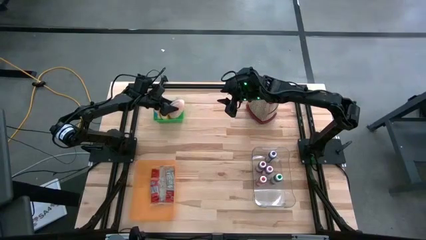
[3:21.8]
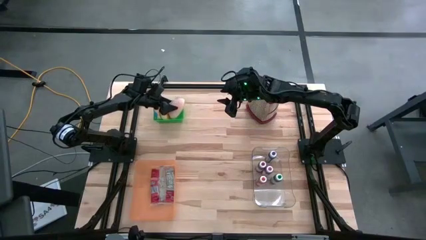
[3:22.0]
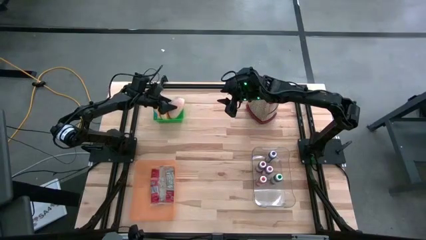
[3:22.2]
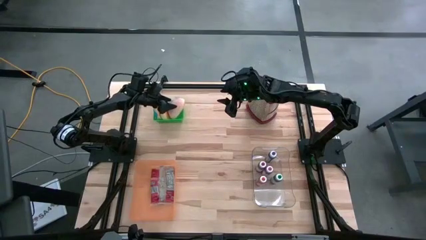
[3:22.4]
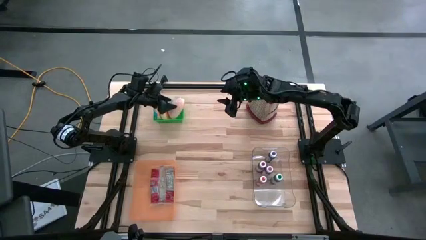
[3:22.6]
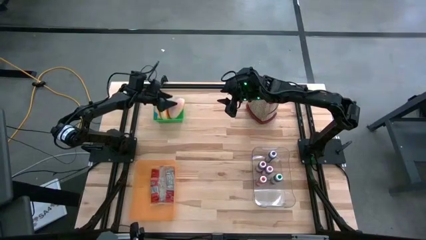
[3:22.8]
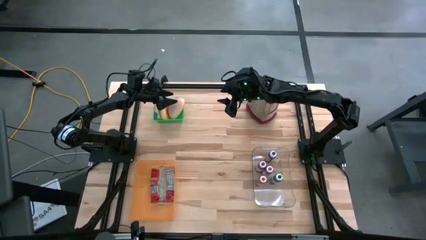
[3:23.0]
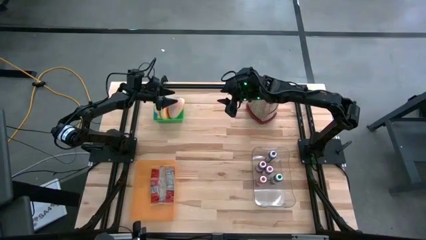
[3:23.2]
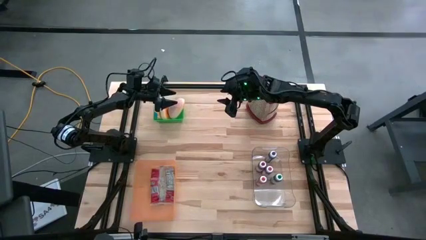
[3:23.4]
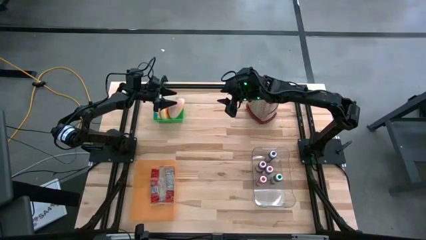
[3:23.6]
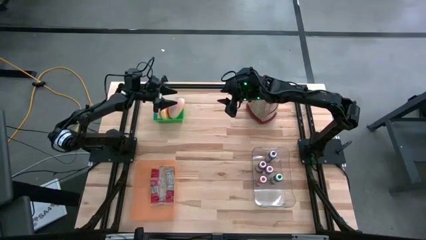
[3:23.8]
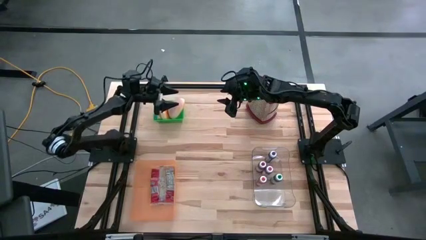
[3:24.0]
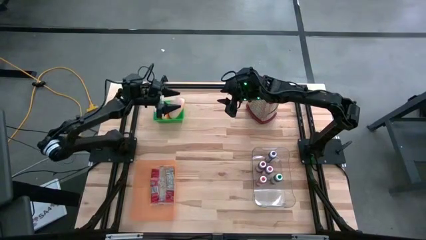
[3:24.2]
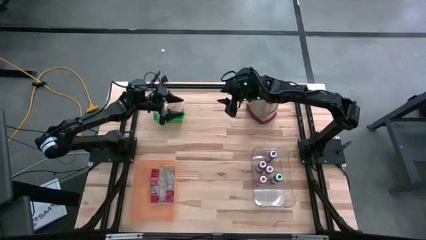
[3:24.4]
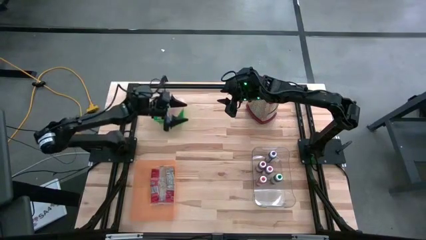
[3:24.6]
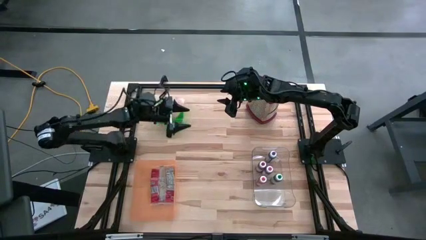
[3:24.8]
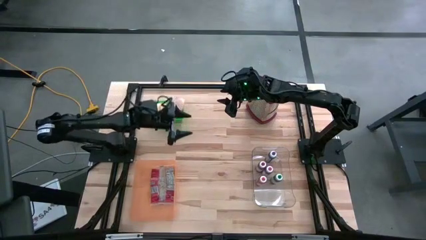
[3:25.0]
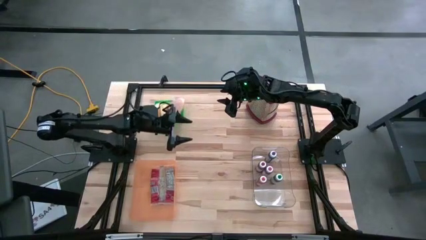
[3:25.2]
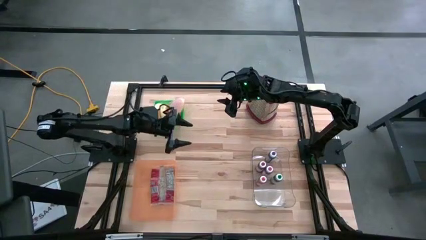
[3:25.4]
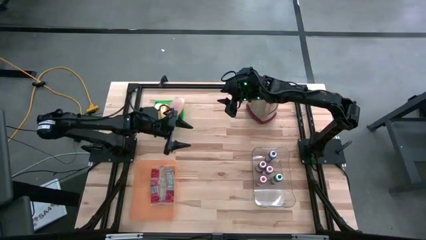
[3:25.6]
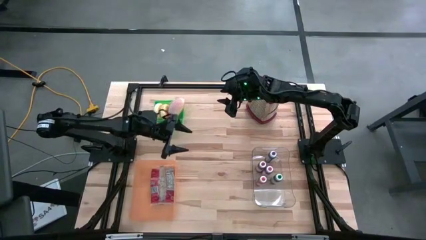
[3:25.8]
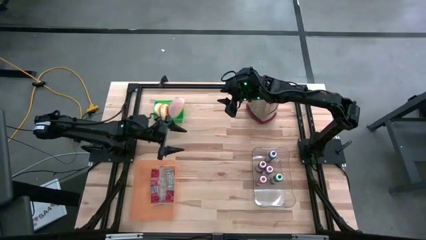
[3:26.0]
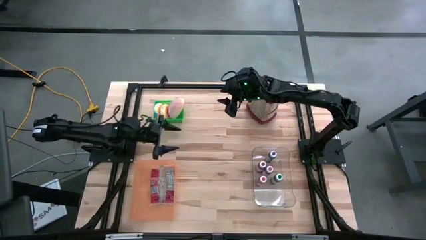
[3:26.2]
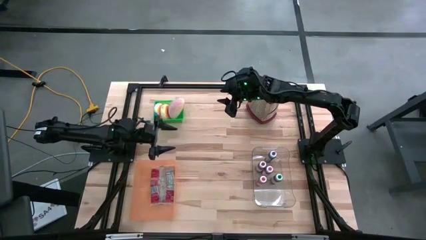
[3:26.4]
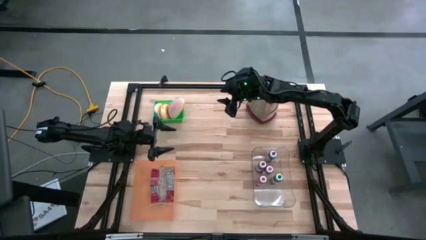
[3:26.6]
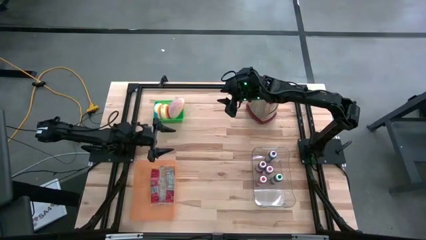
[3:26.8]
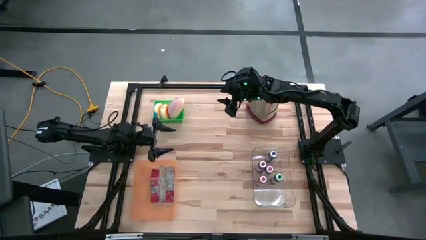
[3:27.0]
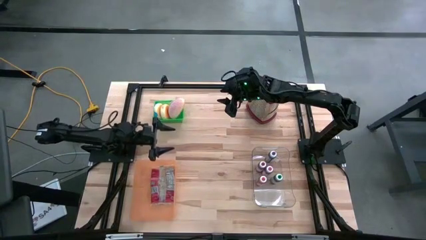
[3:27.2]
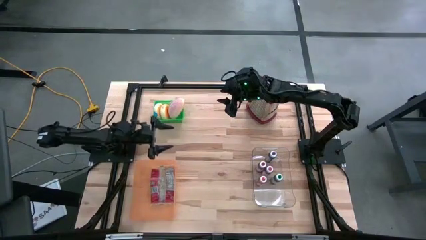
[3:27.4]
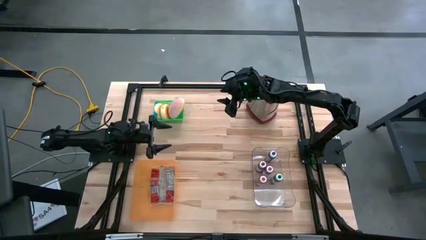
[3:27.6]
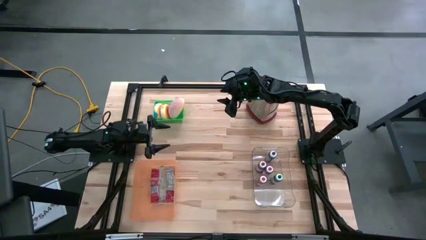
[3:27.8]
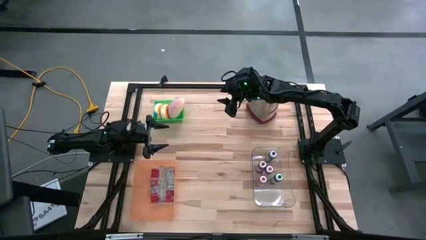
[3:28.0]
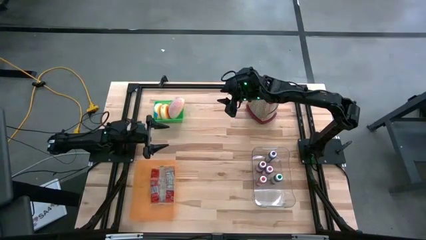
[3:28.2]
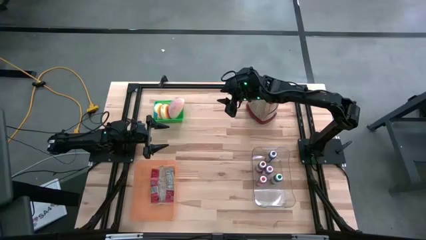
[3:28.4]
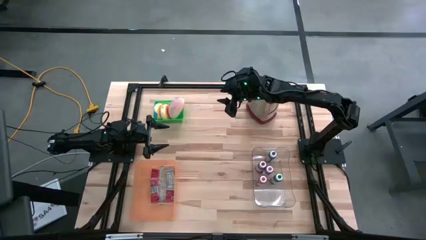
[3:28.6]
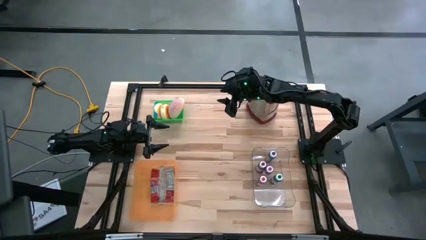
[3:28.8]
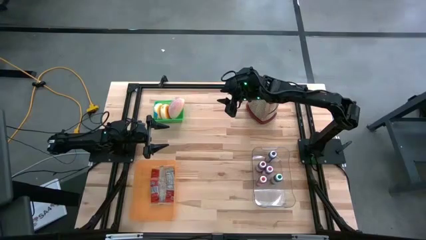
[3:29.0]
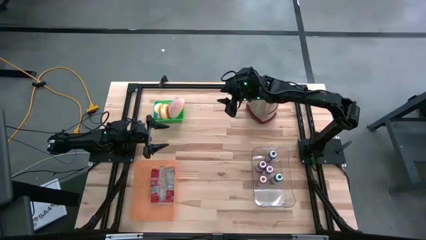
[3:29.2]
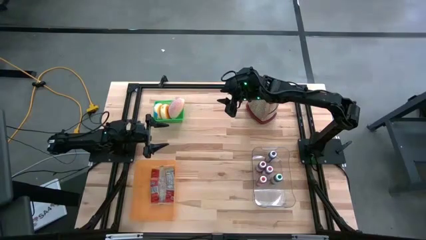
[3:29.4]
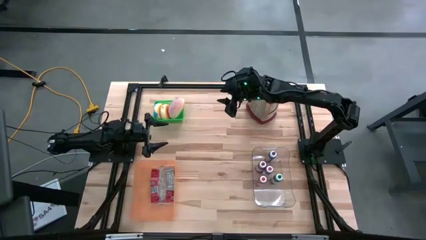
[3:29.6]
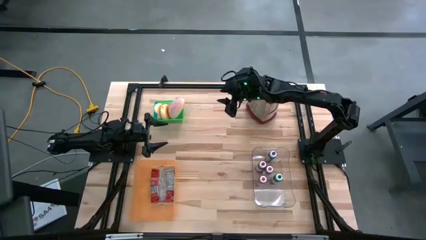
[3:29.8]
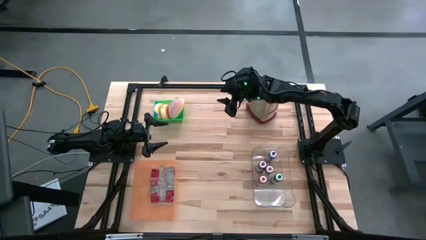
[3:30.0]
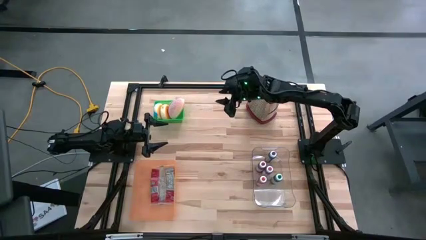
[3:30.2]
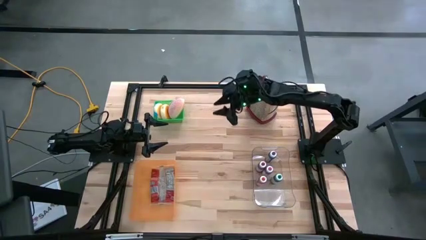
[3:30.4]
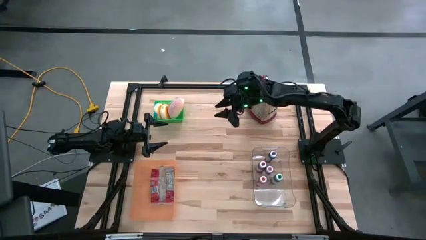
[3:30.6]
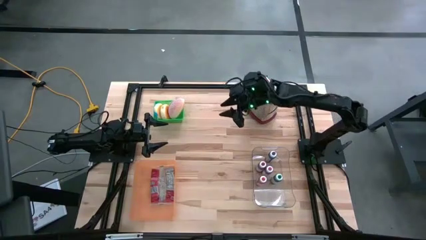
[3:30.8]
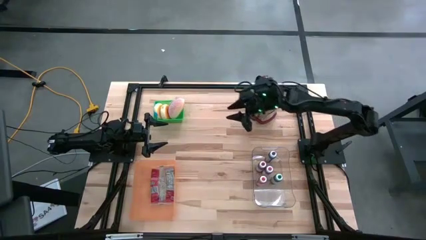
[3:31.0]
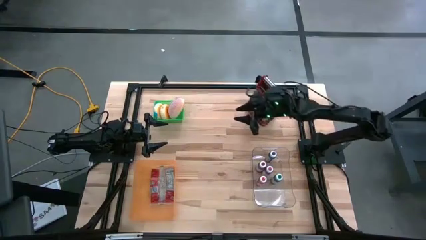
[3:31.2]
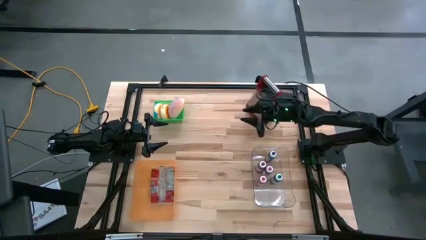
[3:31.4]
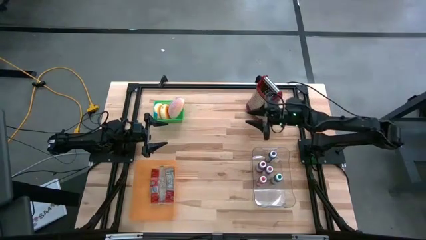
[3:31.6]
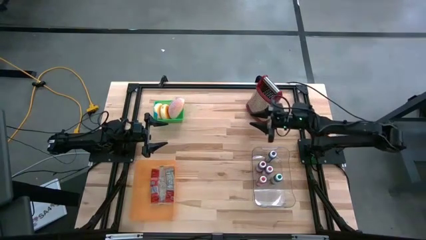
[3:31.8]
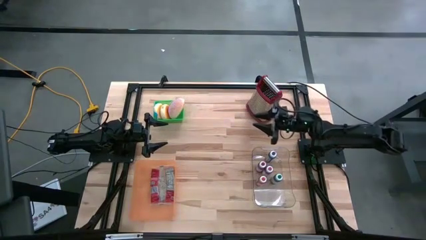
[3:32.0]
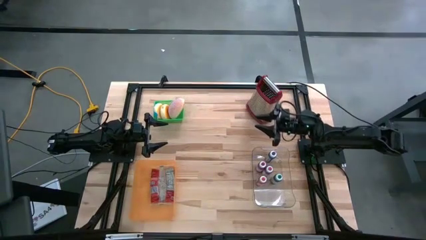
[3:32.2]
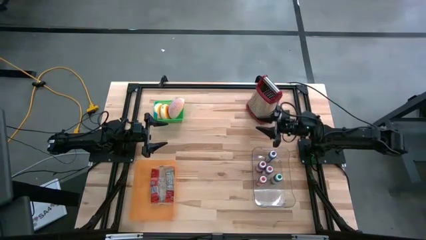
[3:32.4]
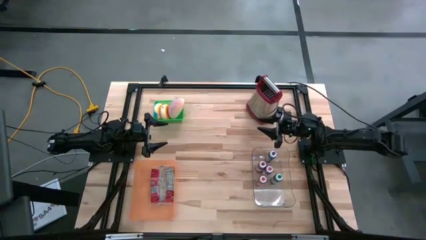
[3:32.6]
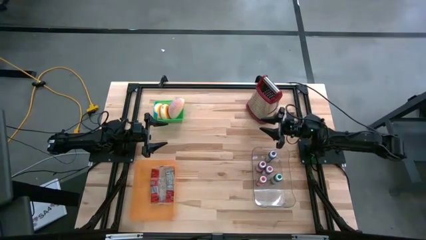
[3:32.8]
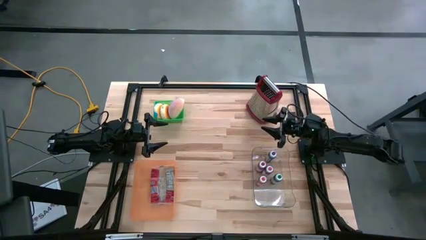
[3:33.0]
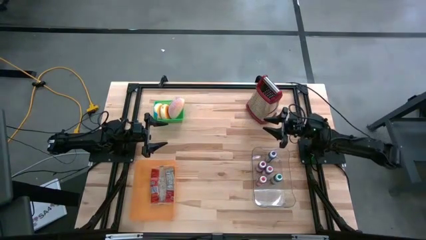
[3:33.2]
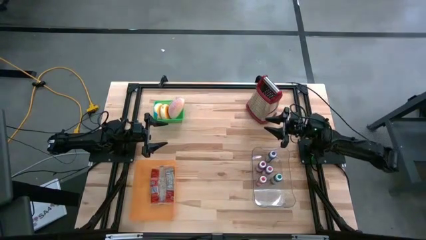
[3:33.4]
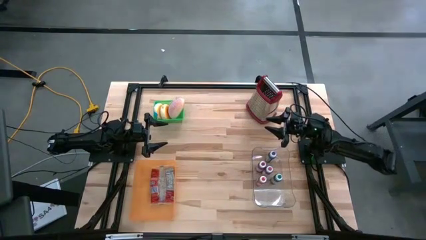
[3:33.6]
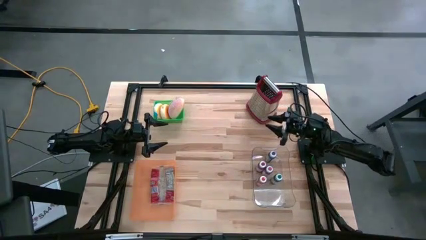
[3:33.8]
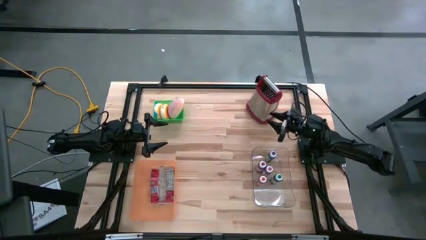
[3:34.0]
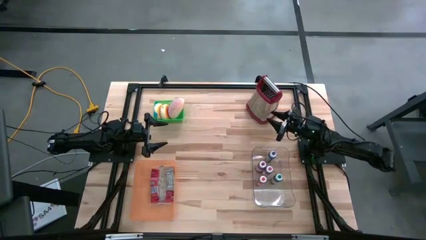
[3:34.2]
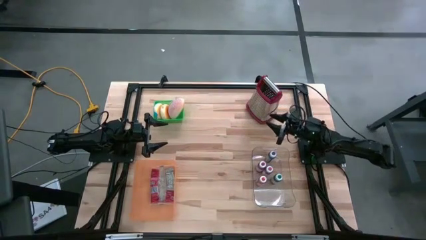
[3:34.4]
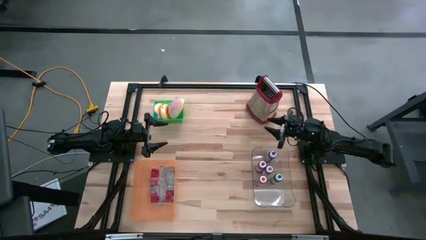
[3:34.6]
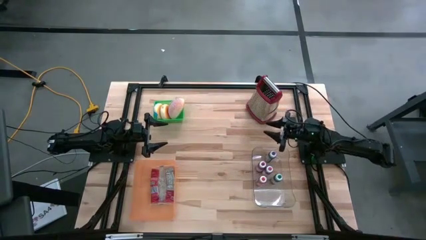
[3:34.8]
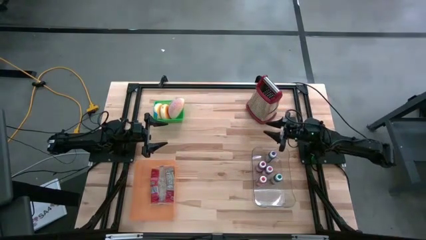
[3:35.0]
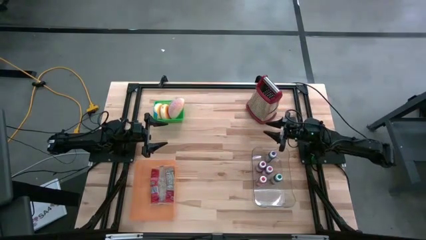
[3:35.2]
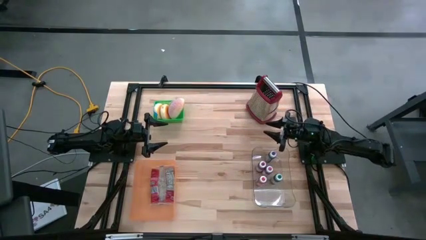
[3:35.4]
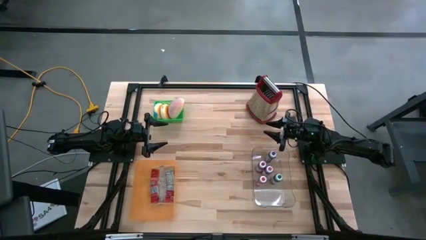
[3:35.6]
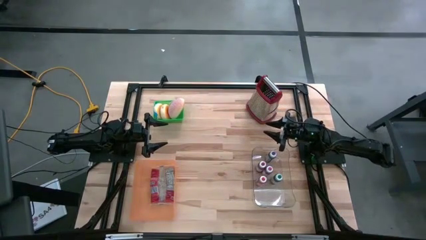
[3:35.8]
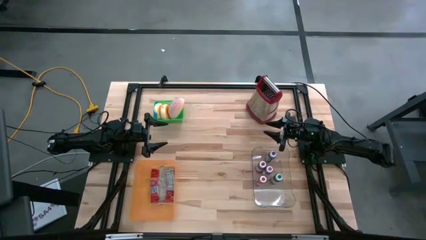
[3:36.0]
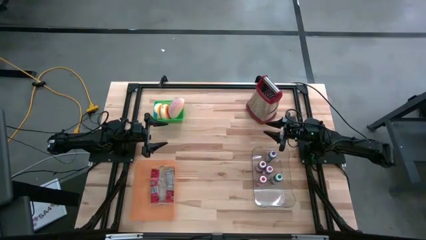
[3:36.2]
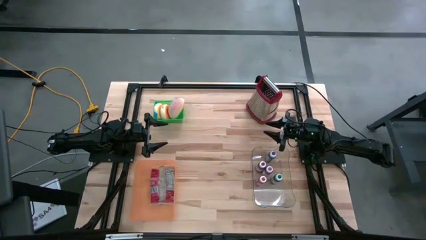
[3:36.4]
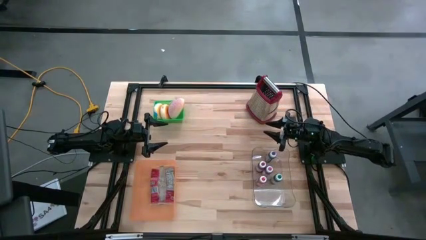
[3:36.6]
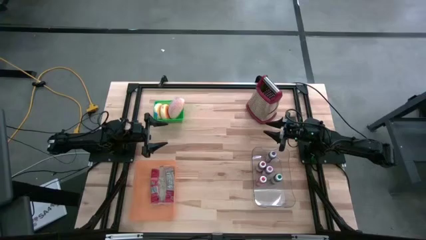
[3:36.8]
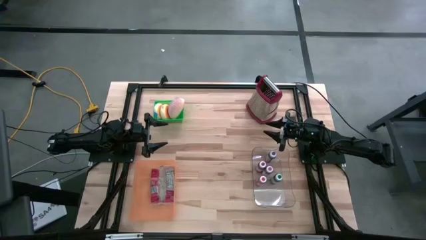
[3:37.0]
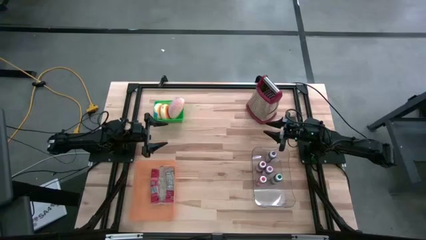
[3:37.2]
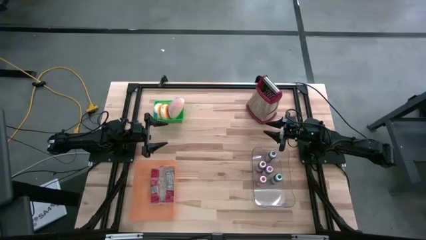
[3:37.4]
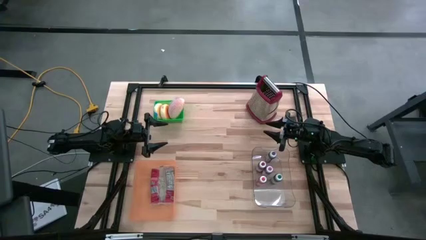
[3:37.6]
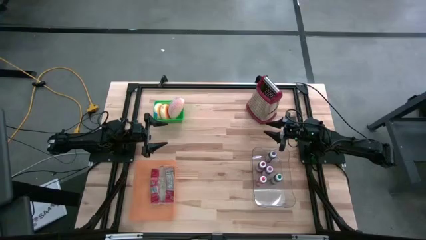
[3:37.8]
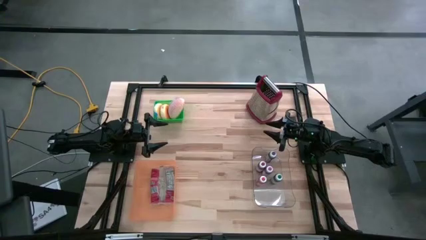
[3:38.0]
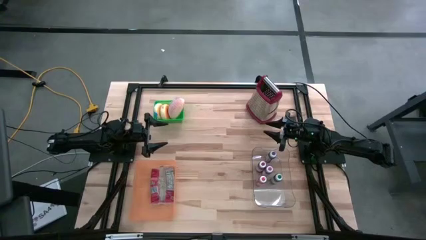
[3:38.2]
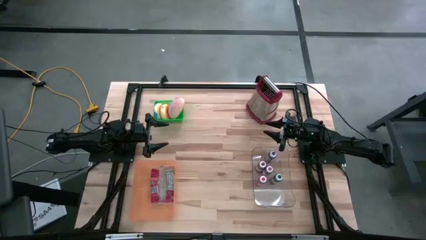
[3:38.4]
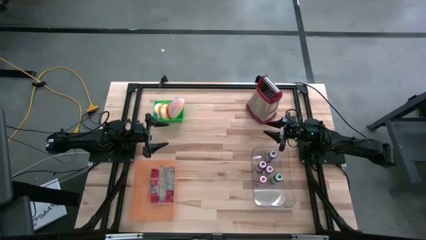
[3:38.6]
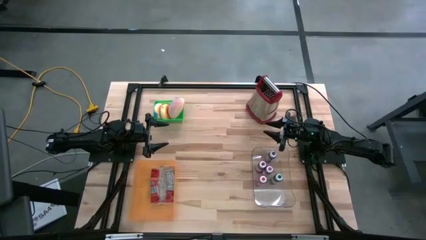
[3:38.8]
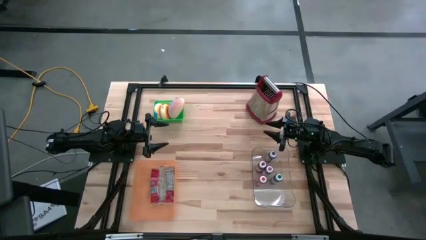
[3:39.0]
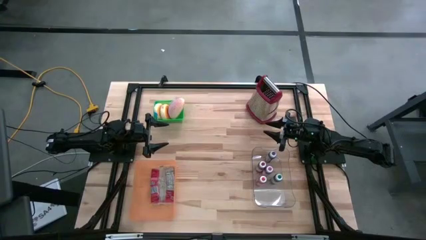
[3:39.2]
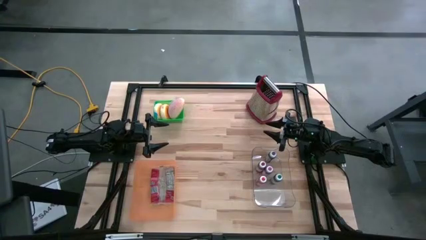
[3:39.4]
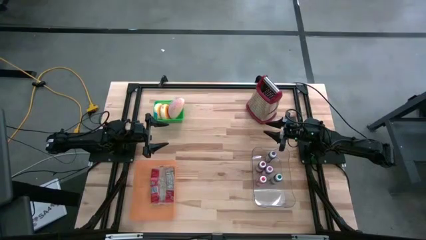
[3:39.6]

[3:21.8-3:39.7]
Return to Home Position
